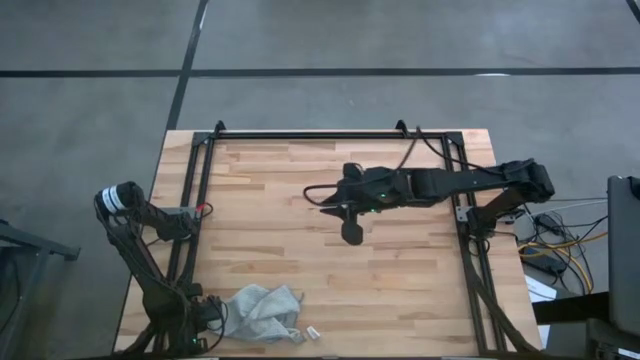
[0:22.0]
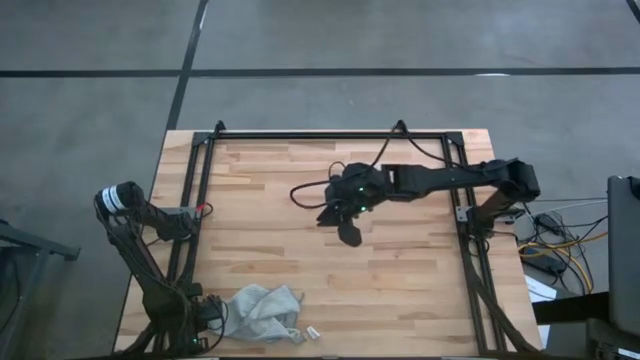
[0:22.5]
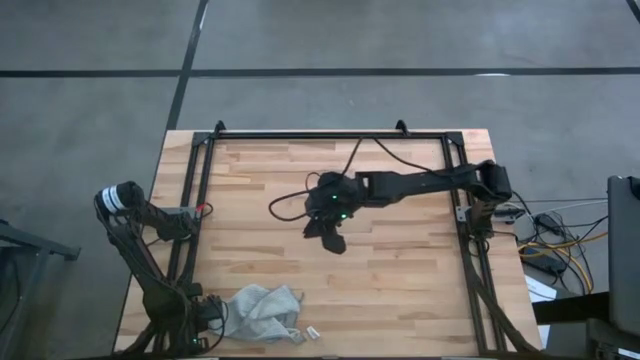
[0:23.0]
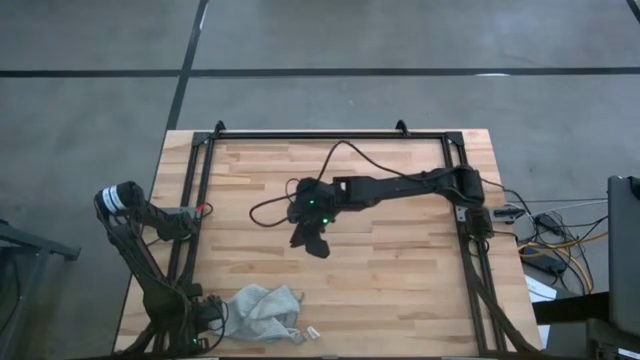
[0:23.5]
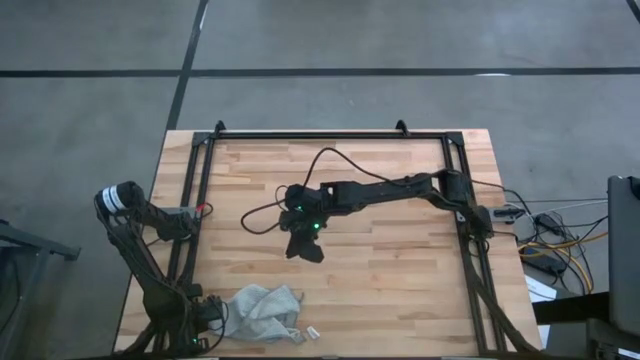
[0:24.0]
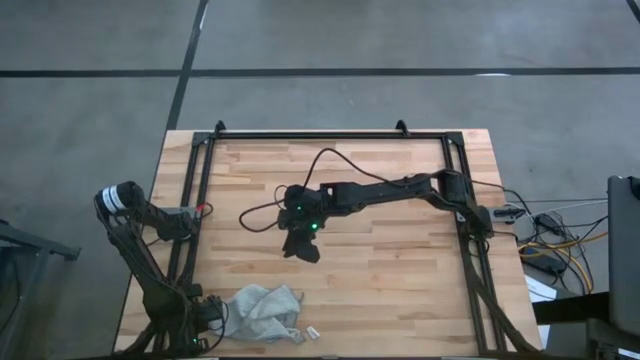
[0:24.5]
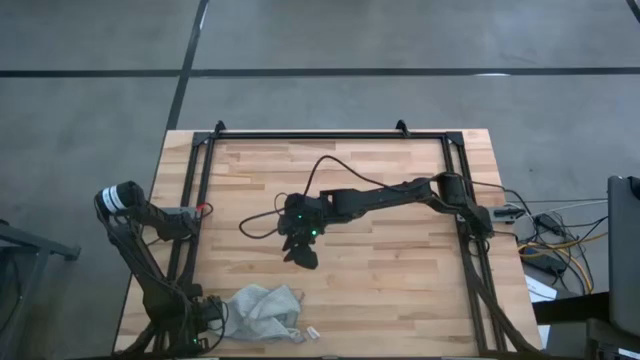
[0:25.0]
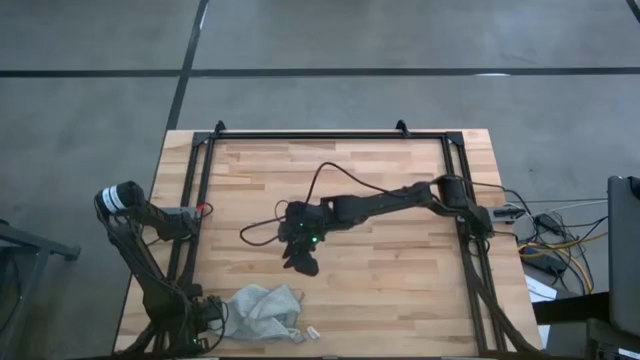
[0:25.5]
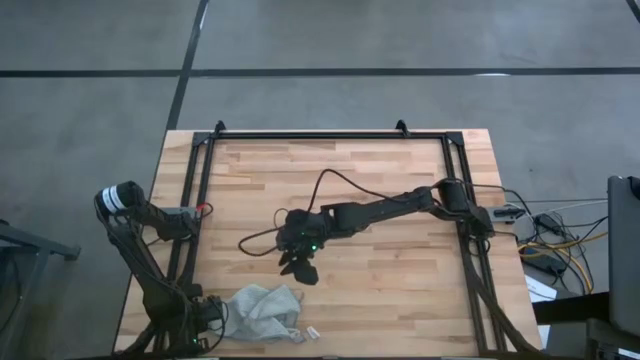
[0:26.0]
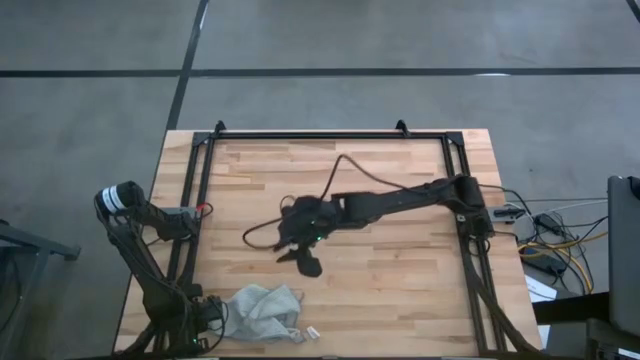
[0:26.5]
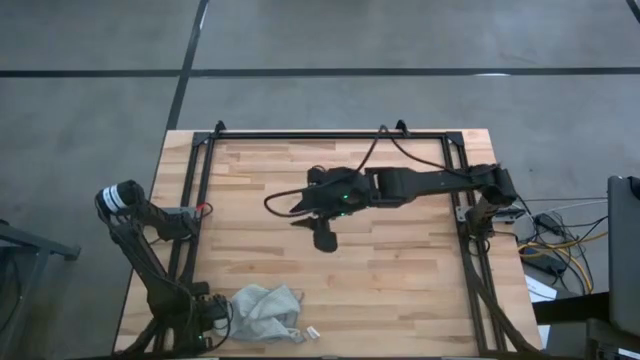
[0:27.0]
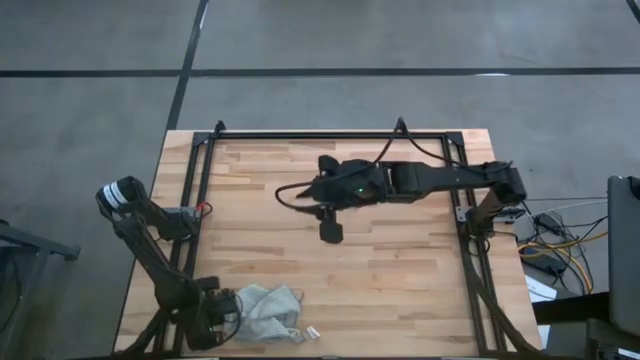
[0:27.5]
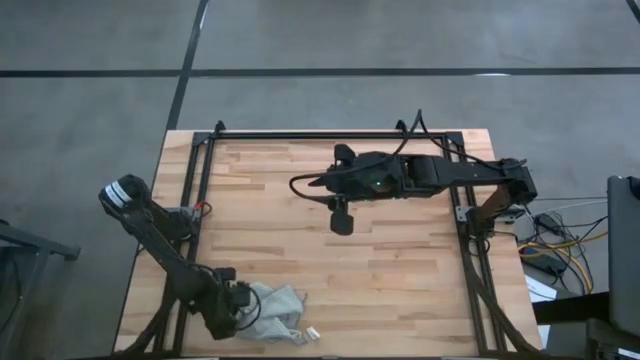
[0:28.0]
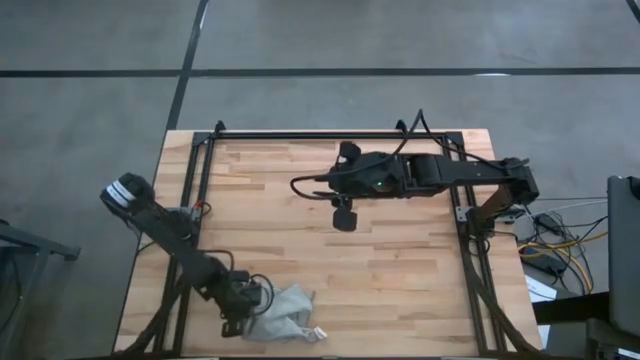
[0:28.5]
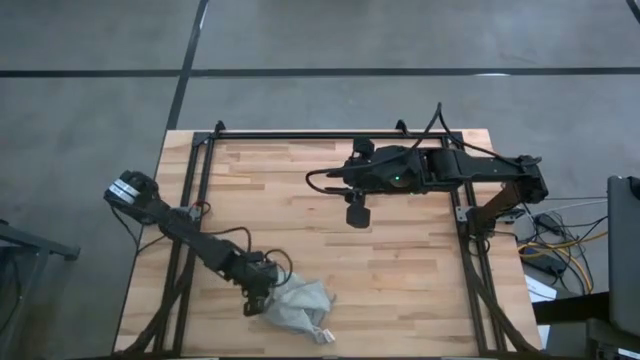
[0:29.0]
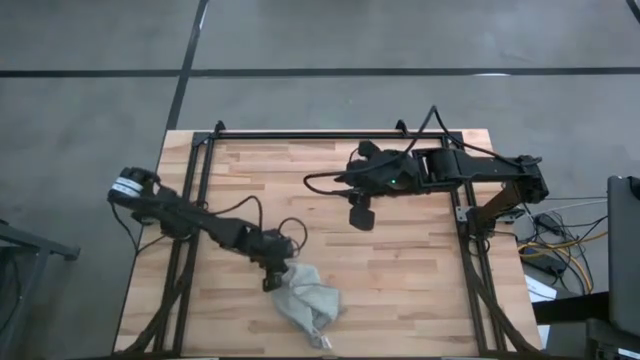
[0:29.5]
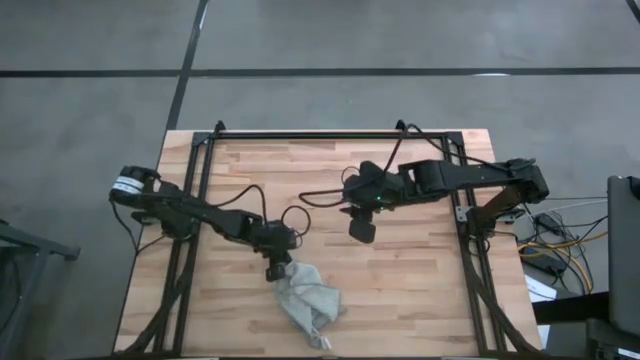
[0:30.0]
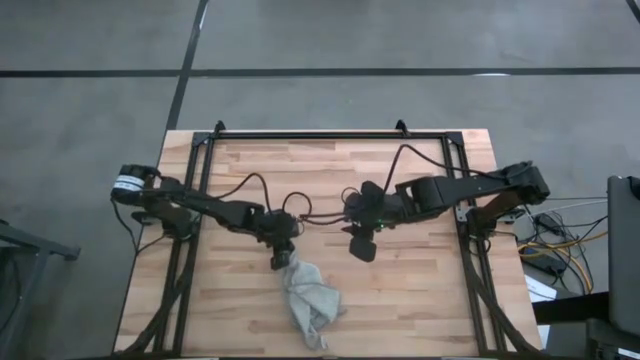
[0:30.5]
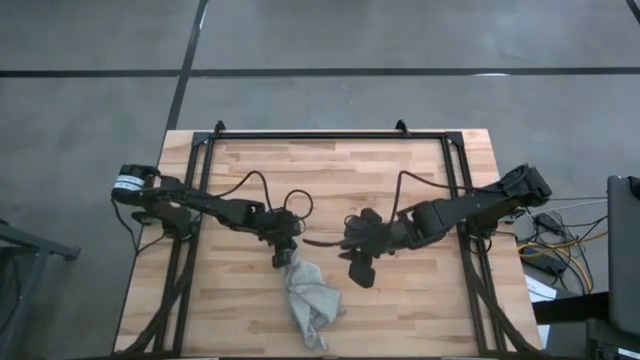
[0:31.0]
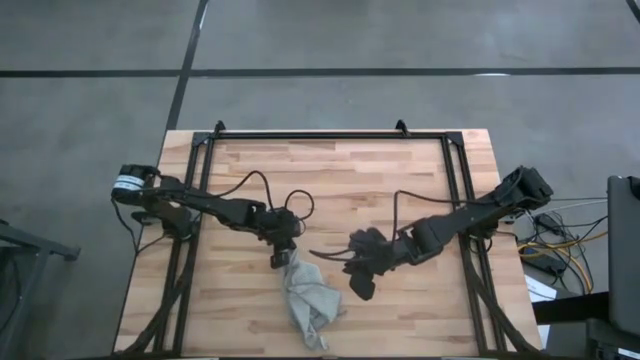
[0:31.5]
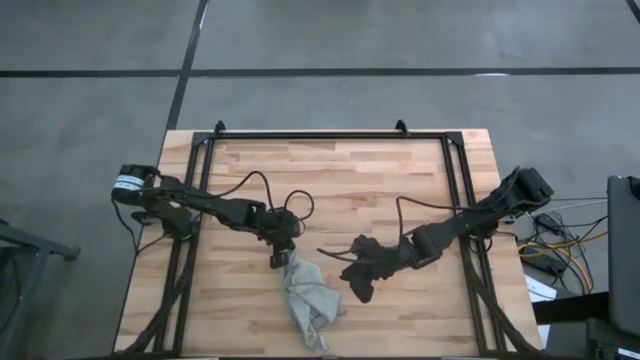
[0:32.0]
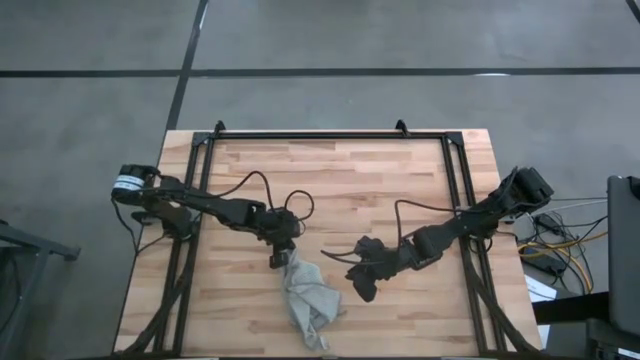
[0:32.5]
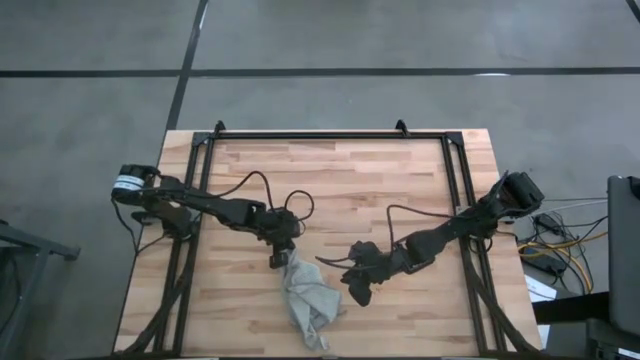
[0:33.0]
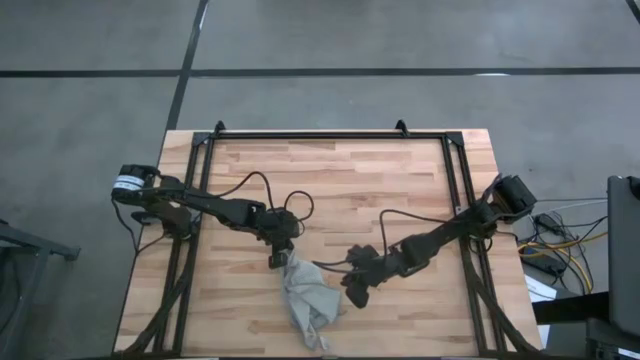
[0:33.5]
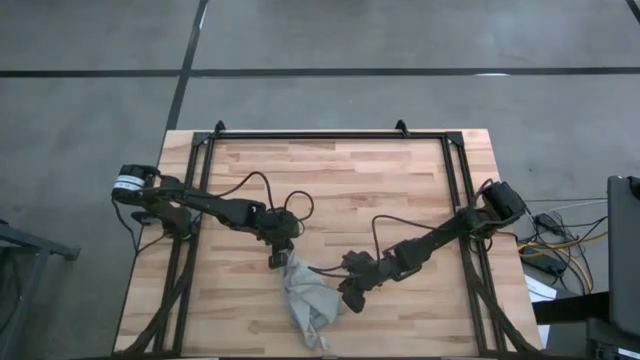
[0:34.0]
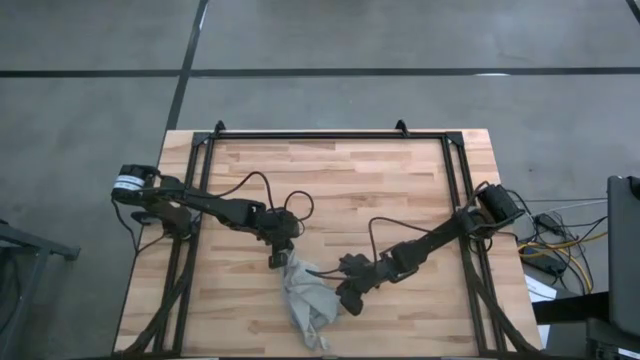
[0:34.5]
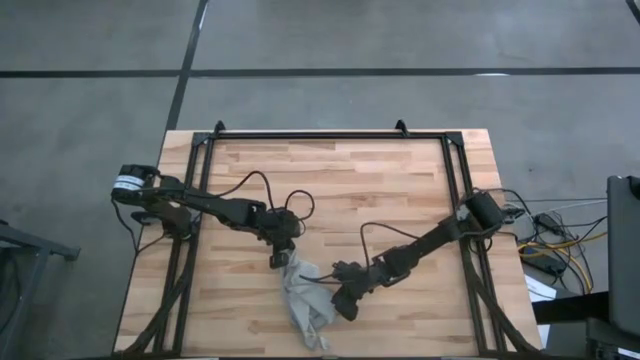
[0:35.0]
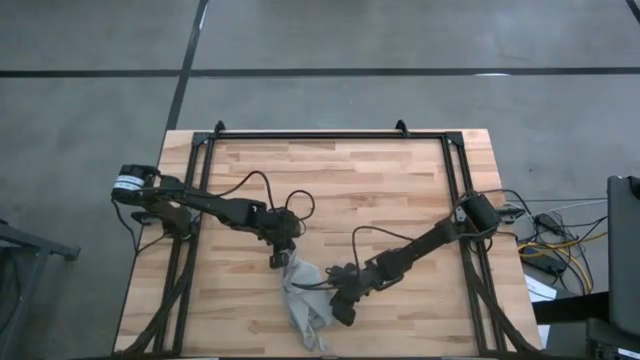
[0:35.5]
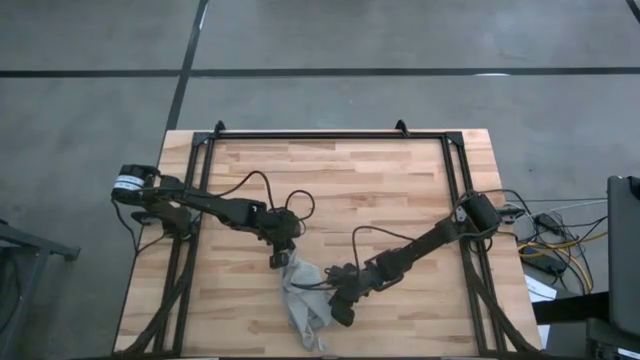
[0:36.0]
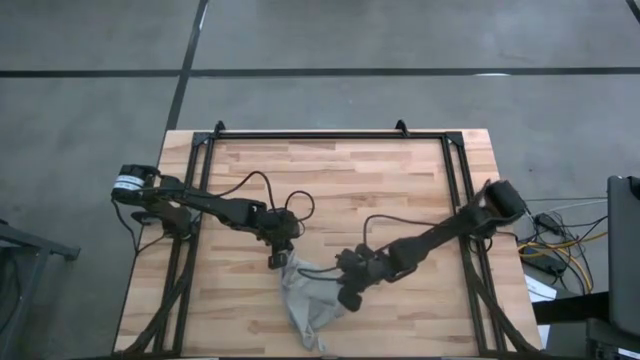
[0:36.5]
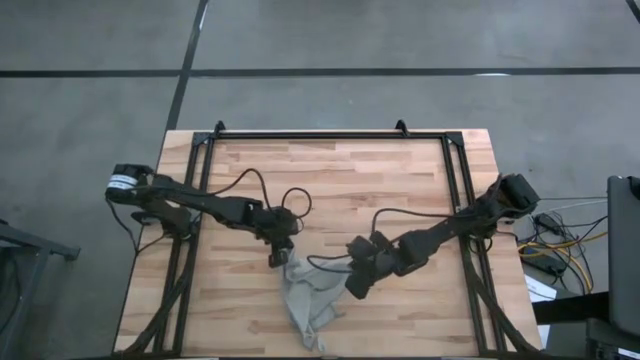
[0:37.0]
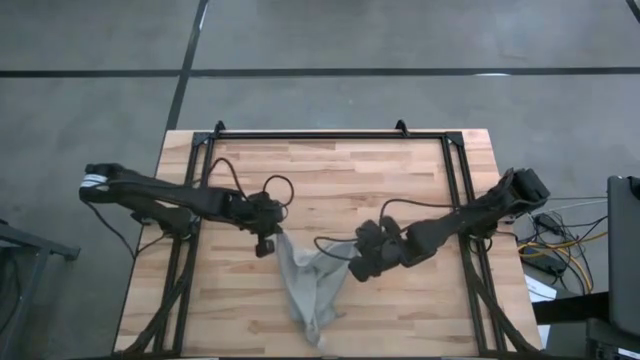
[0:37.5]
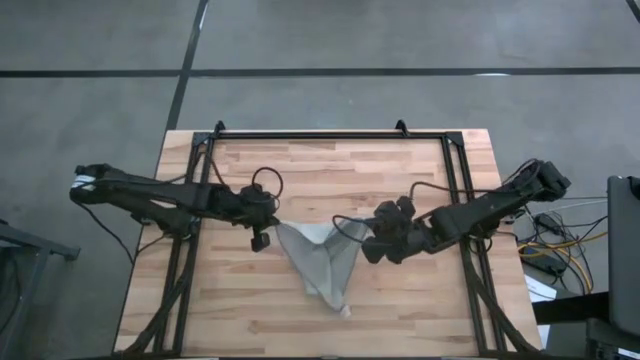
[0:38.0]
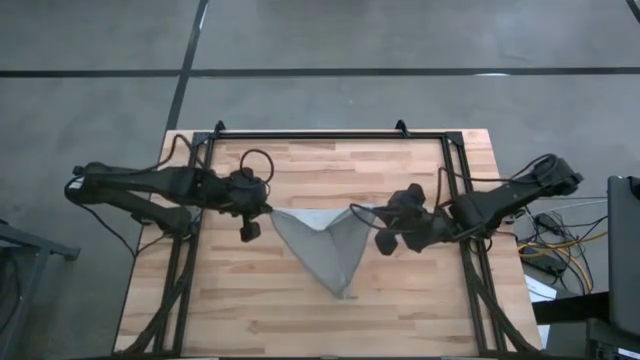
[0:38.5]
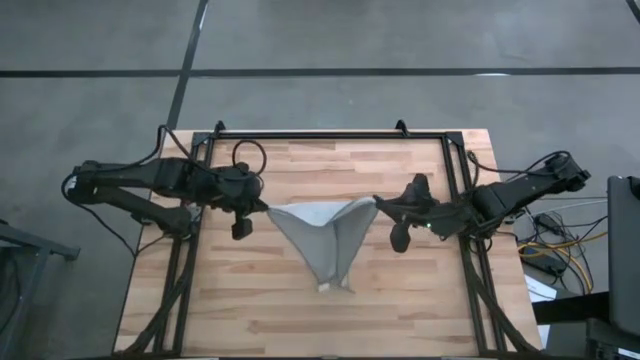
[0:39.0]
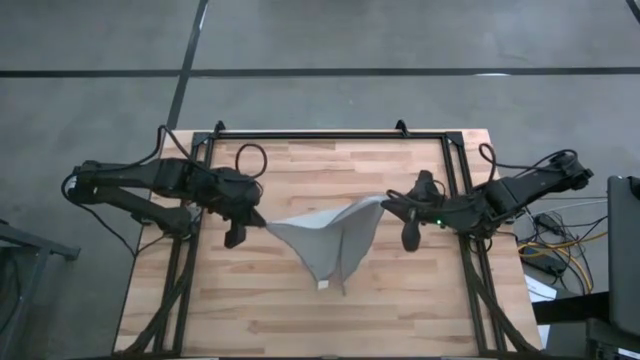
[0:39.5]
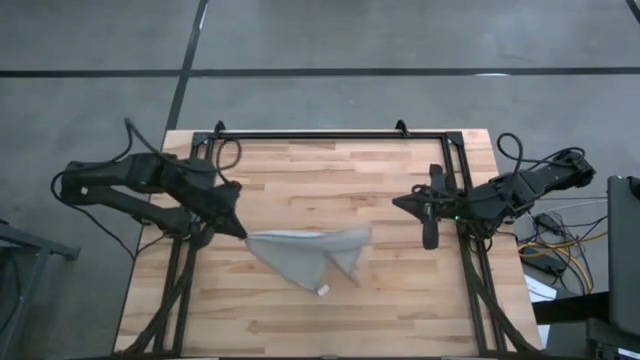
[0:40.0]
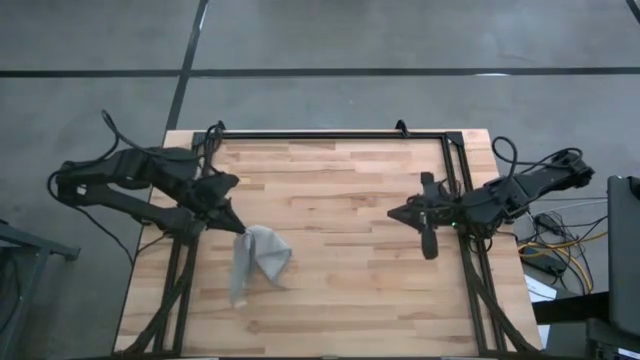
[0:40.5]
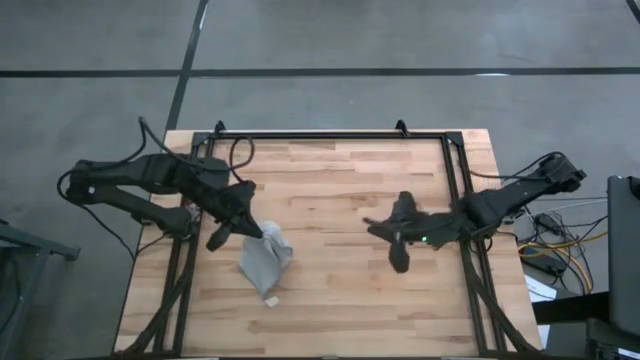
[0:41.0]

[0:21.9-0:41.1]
Task: Fold microfiber towels
Prepare the microfiber cloth on the table
